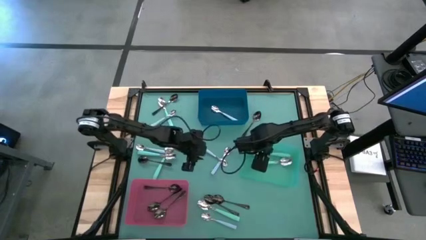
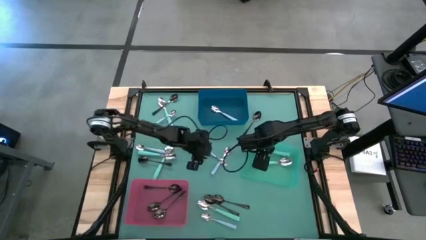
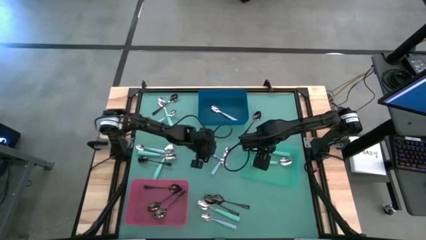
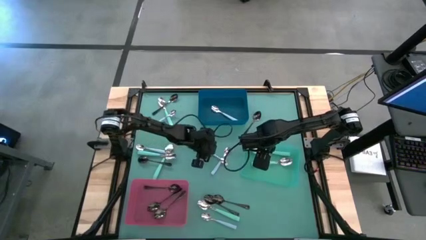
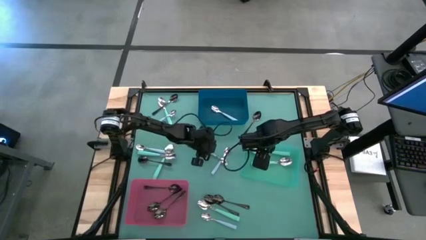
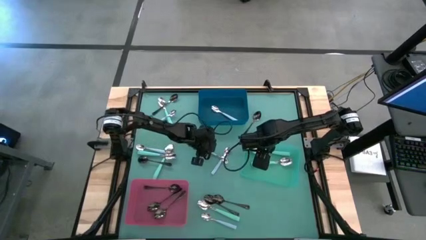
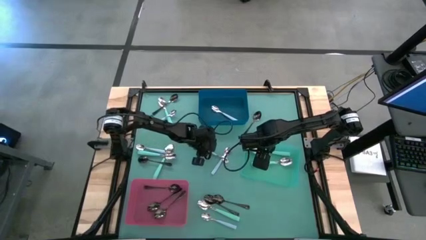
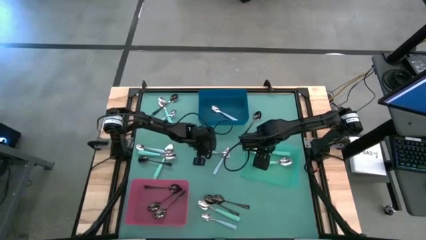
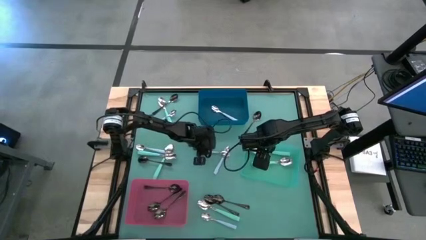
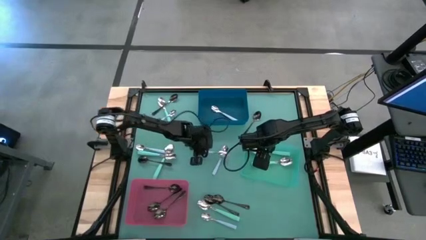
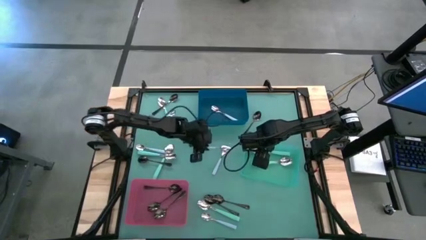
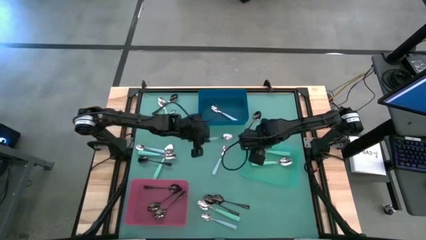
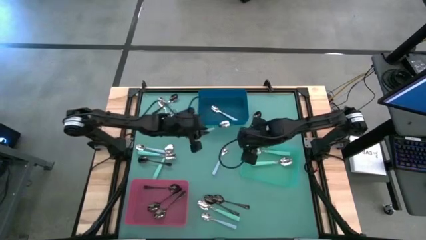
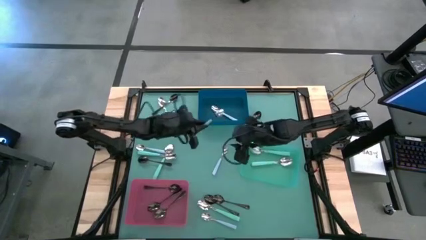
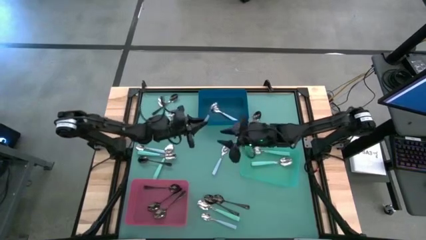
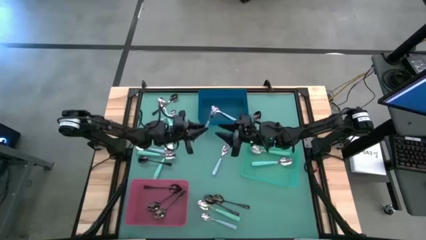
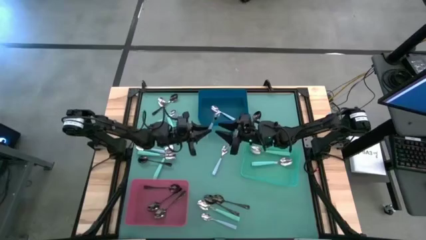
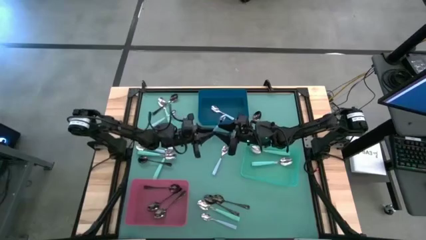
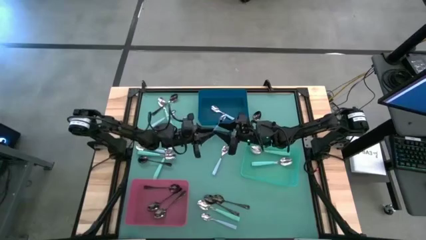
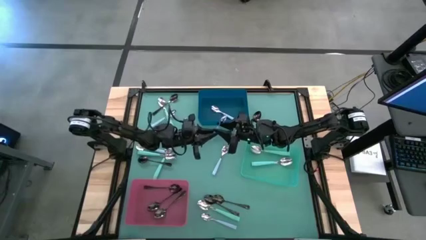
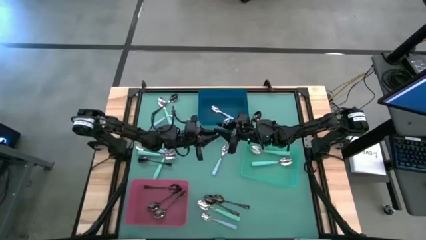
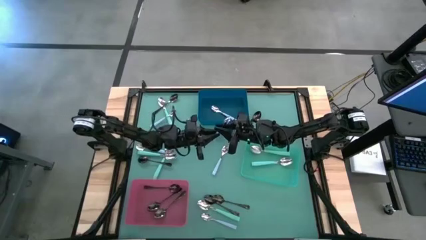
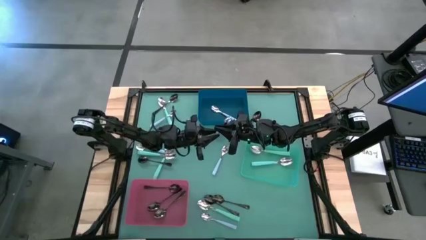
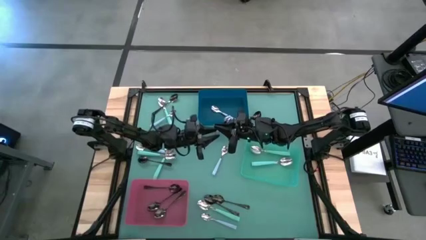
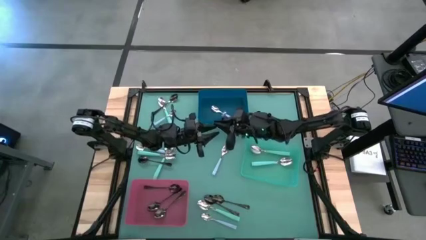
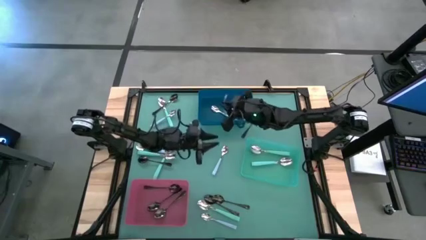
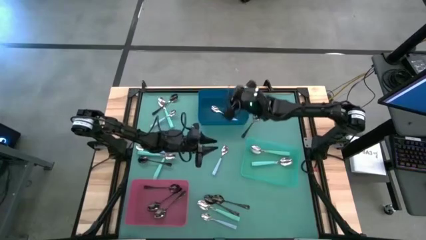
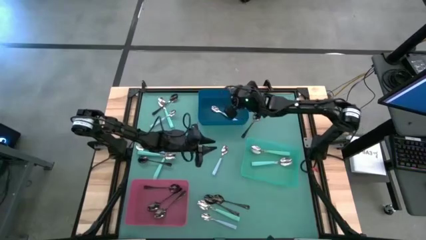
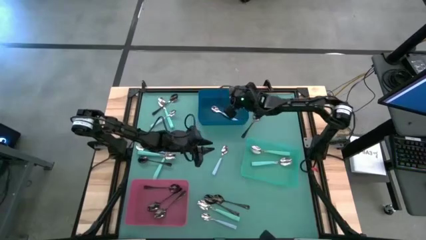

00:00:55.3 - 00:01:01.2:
Task: Sort silverware by color (type)
Put the blue spoon into the blue bin

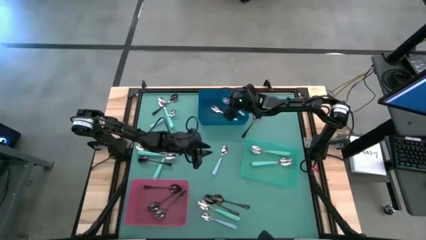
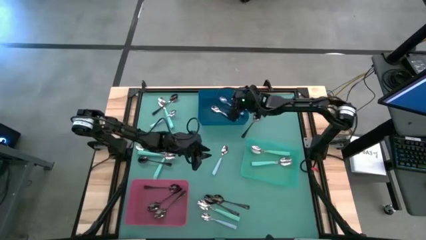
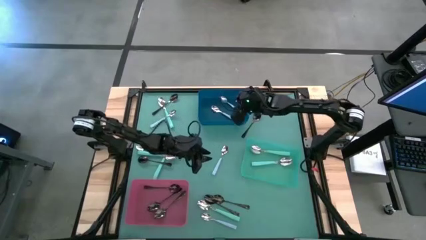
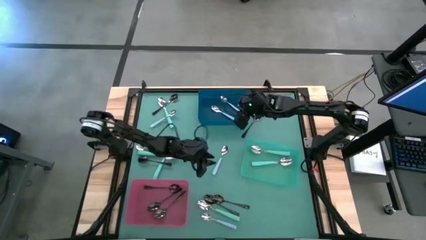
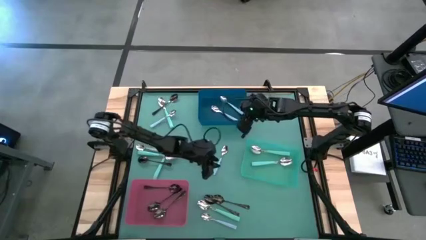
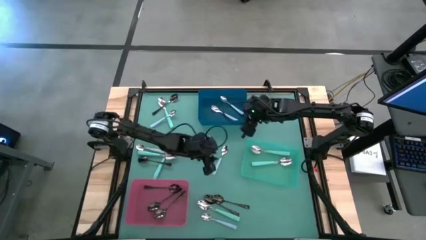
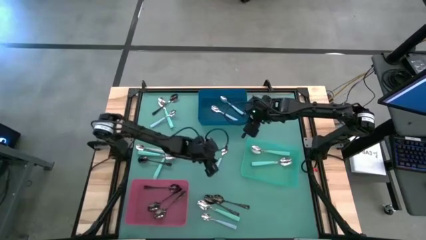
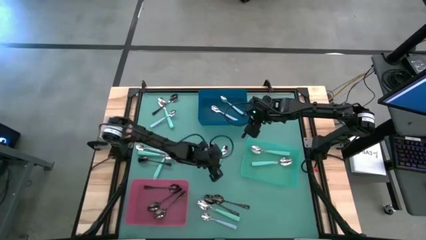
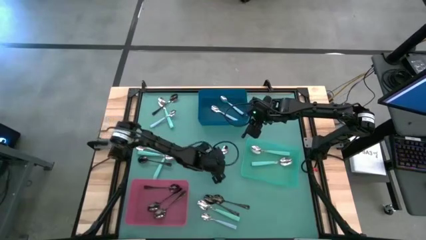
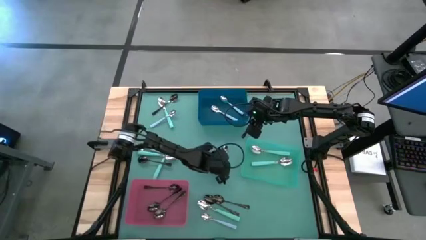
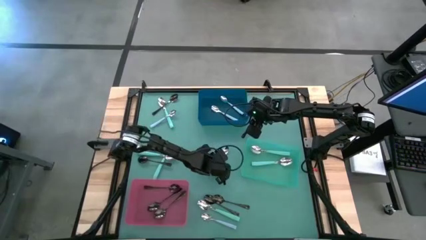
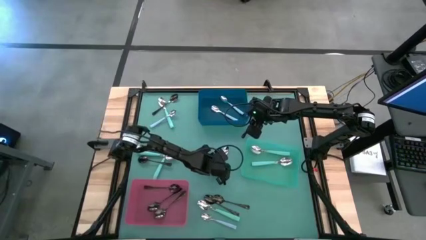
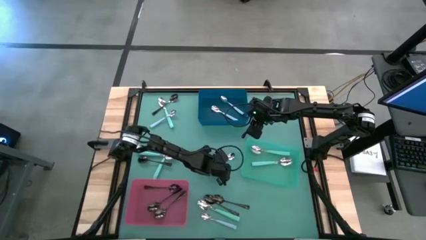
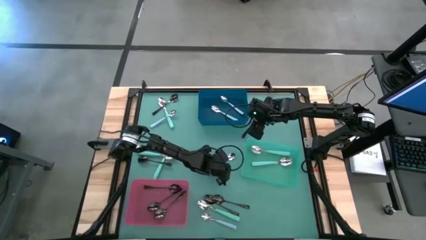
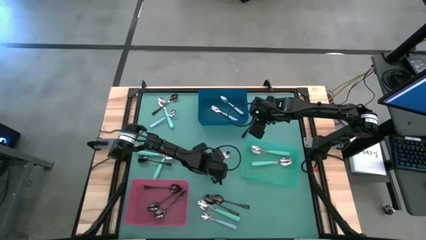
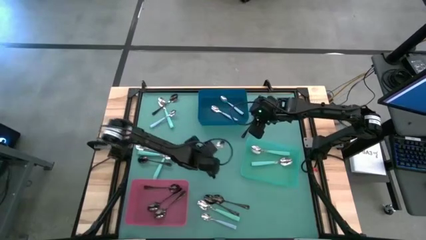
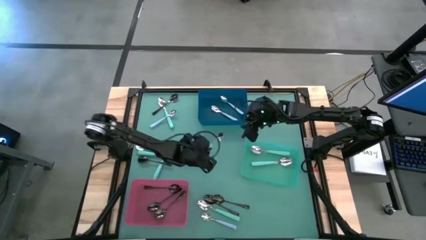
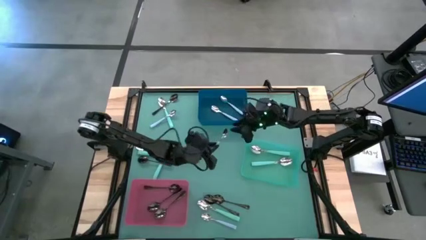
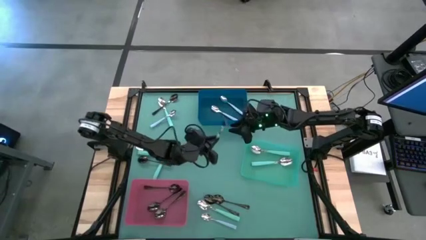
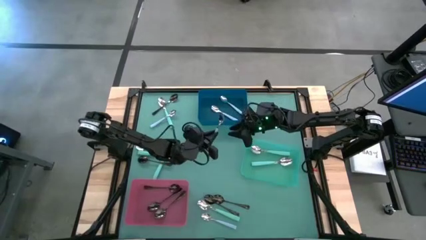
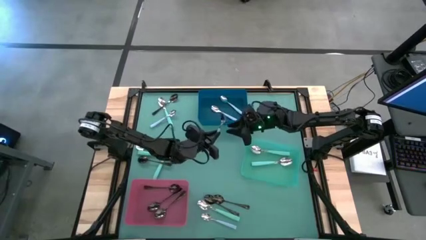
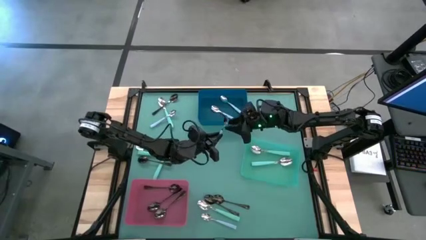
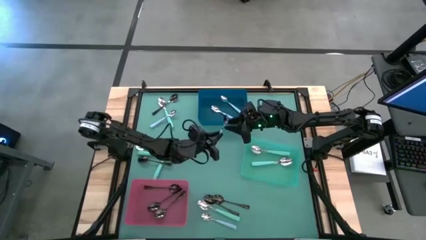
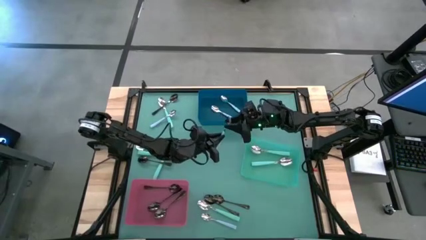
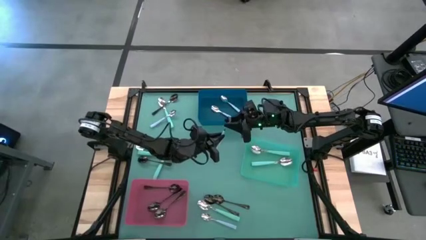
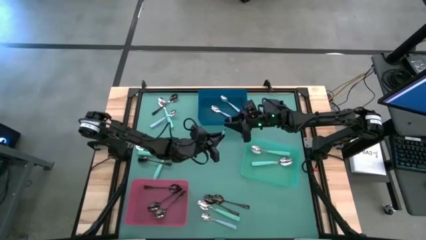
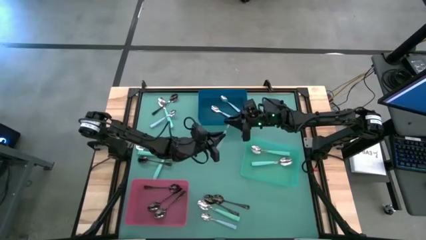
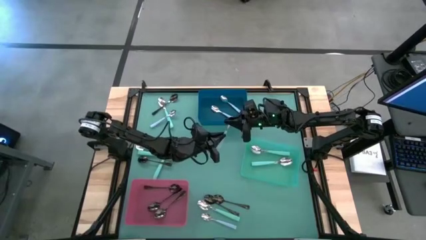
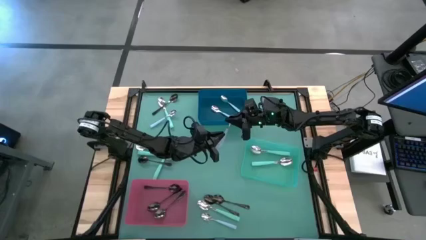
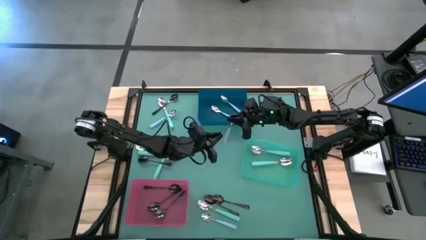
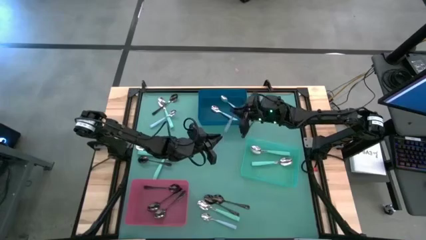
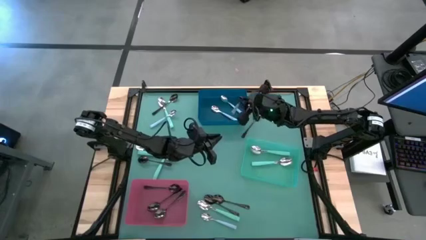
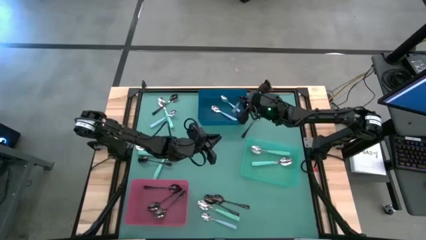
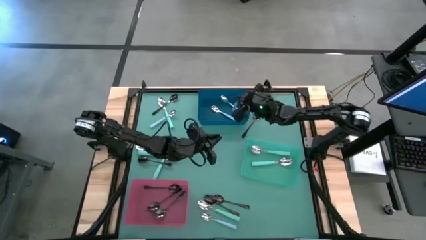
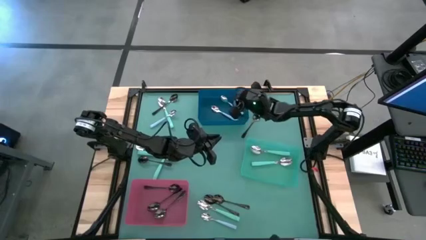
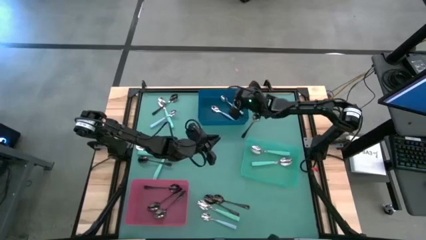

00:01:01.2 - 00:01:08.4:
Put the blue spoon into the blue bin

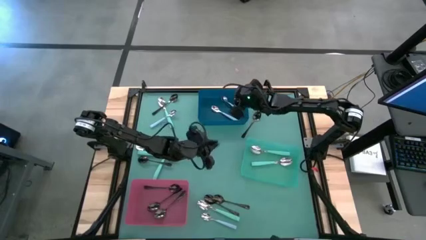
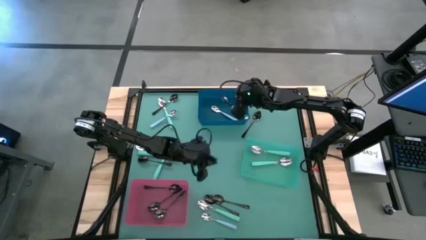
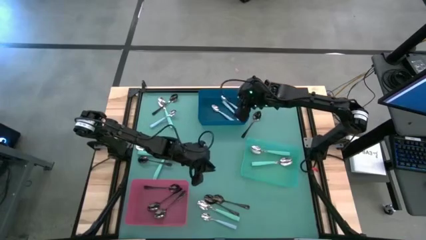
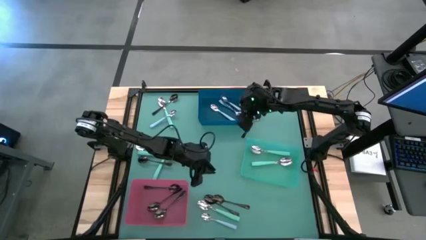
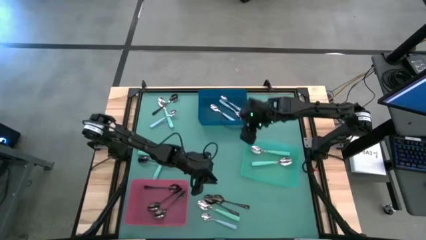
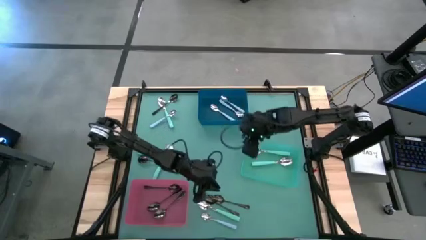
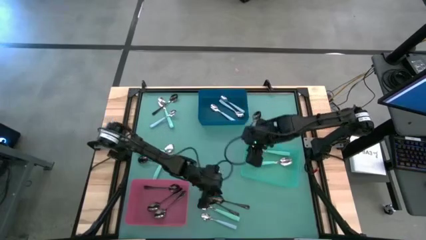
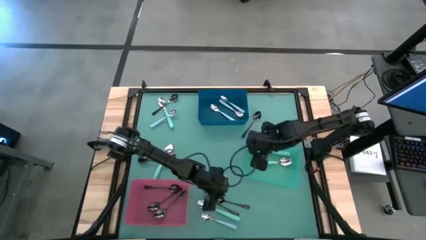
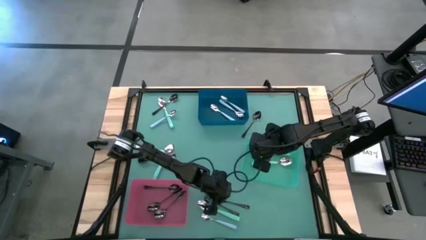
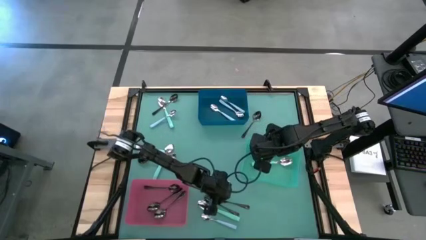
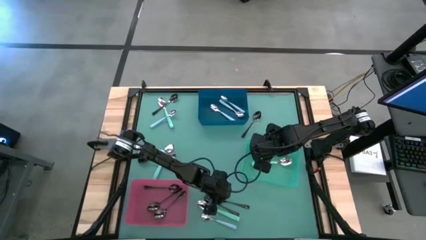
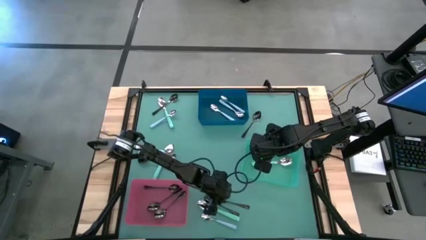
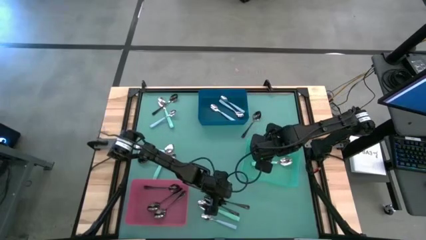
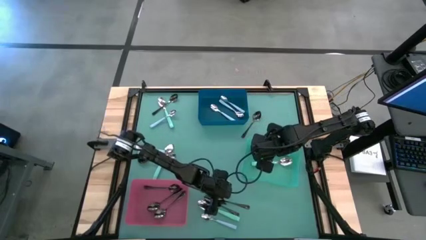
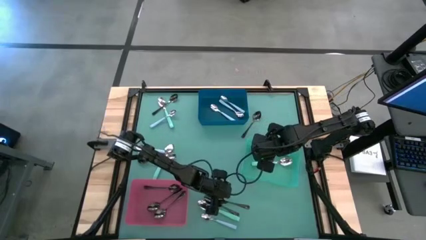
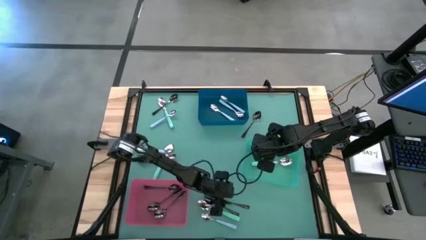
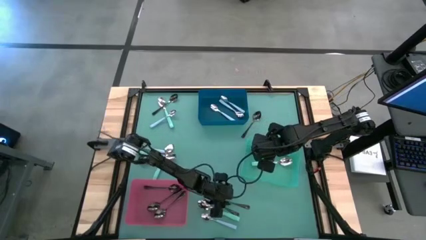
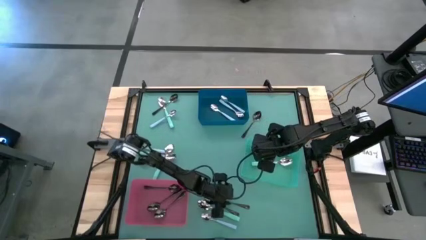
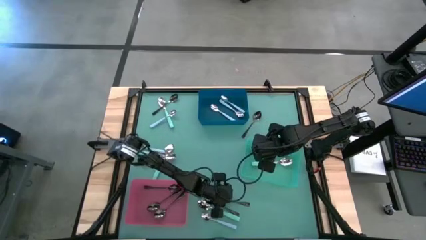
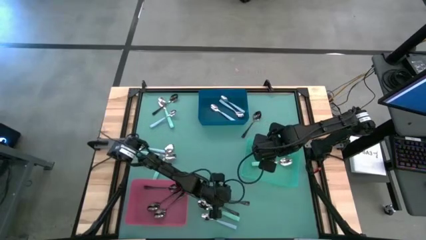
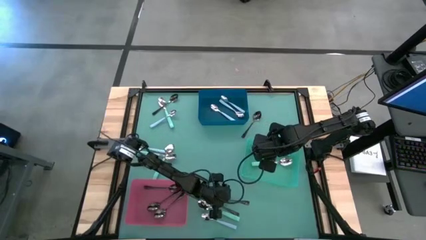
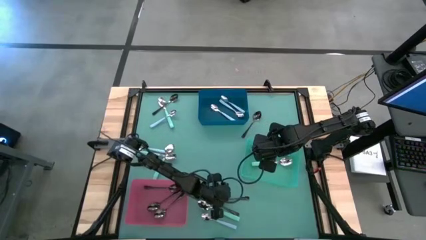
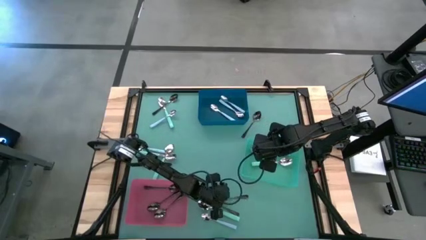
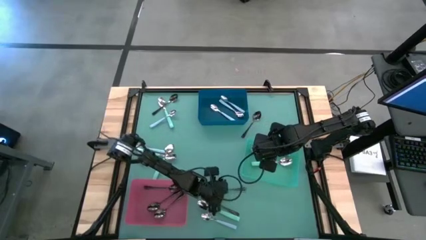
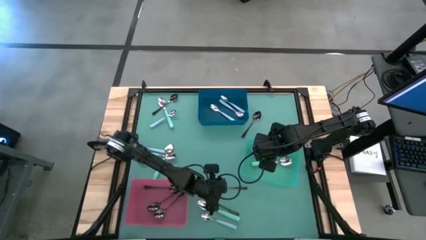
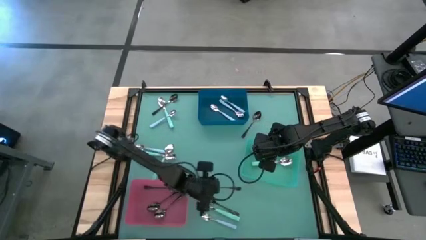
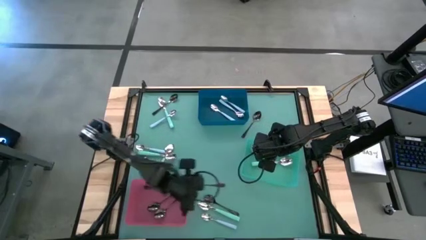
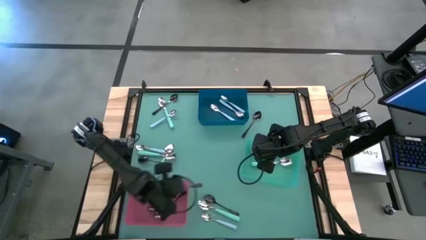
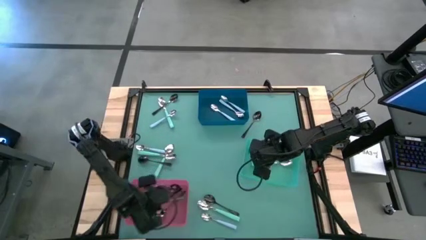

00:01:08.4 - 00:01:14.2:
Put the black spoon into the red bin
